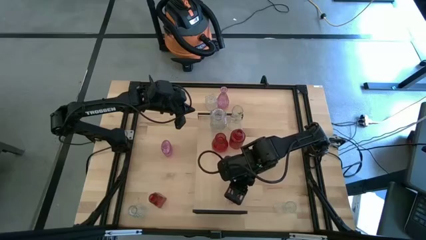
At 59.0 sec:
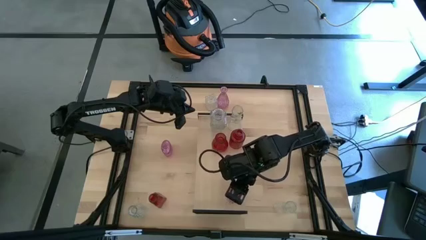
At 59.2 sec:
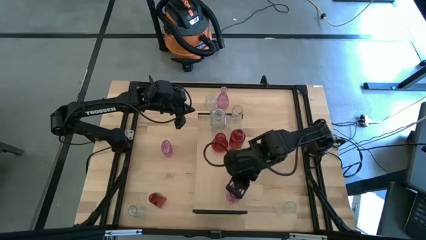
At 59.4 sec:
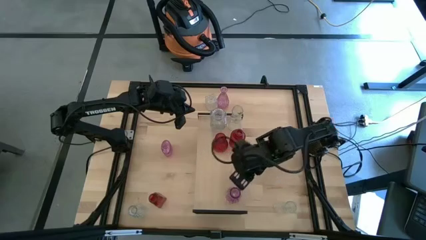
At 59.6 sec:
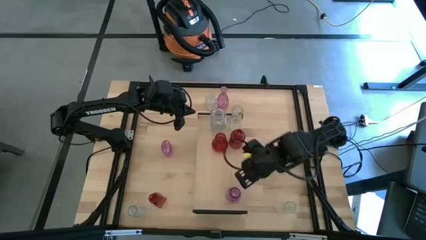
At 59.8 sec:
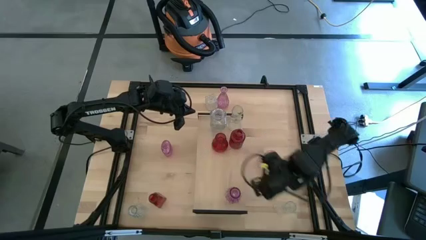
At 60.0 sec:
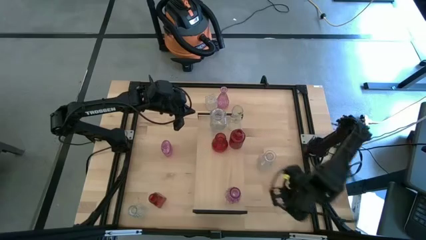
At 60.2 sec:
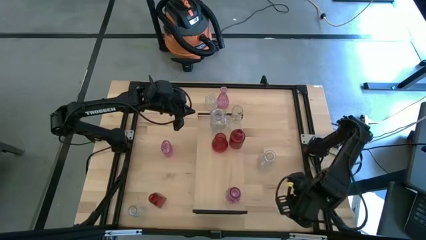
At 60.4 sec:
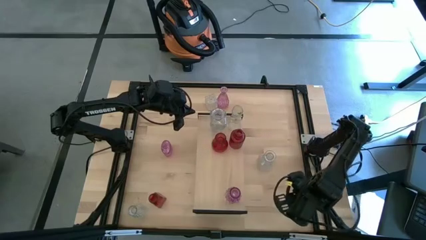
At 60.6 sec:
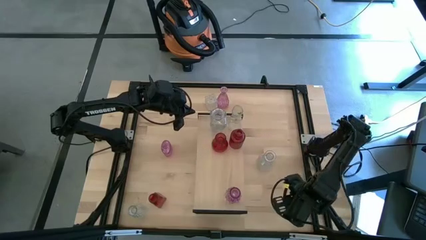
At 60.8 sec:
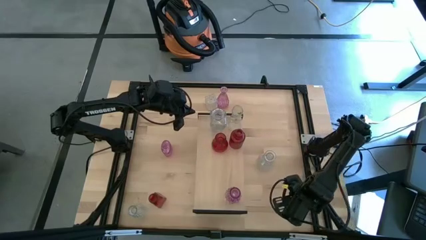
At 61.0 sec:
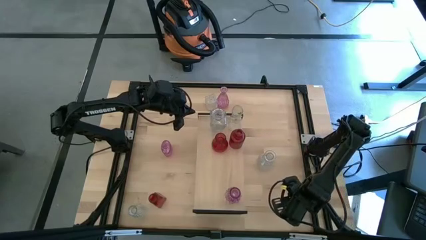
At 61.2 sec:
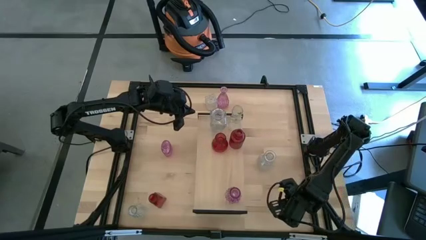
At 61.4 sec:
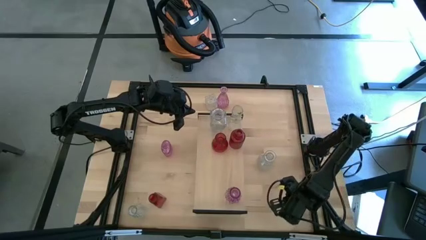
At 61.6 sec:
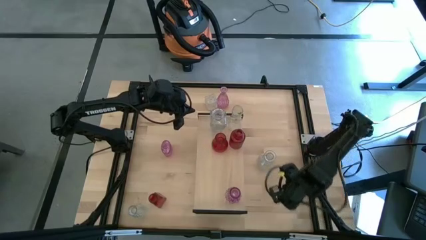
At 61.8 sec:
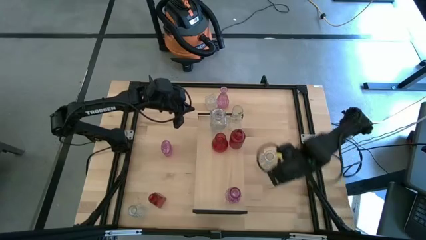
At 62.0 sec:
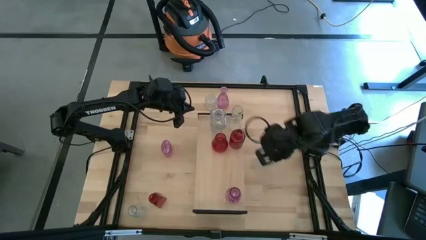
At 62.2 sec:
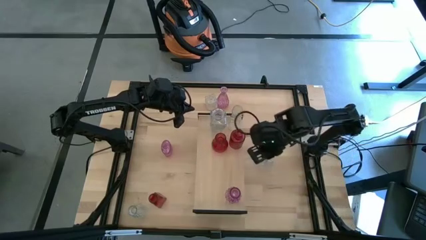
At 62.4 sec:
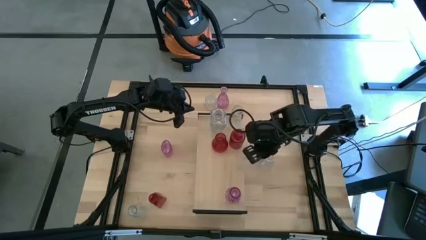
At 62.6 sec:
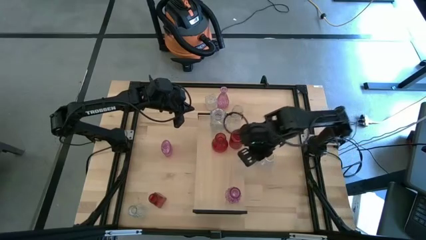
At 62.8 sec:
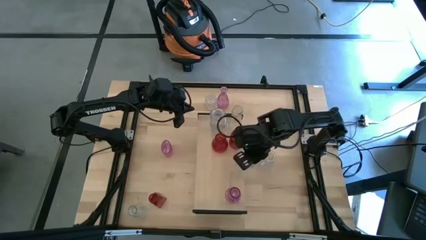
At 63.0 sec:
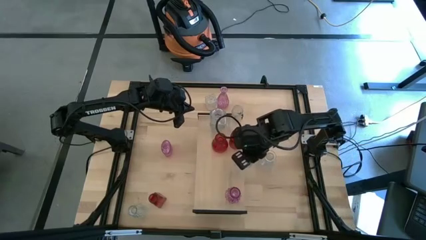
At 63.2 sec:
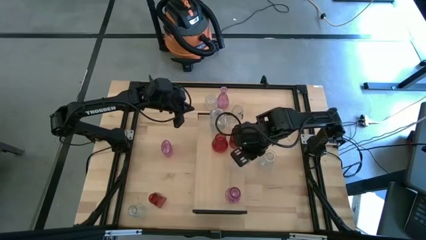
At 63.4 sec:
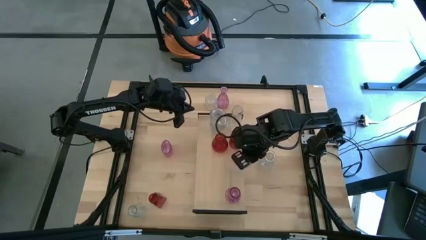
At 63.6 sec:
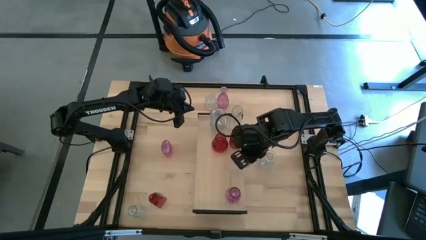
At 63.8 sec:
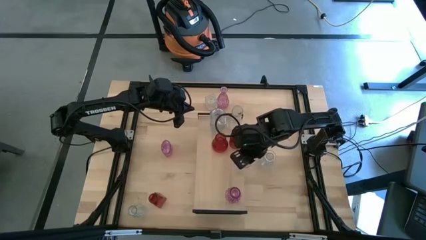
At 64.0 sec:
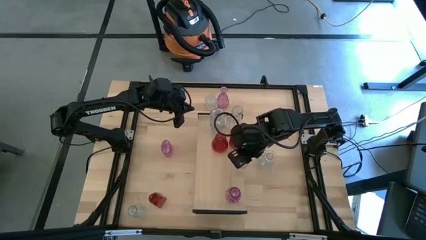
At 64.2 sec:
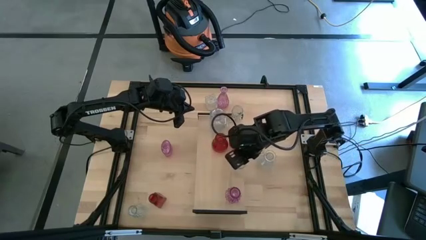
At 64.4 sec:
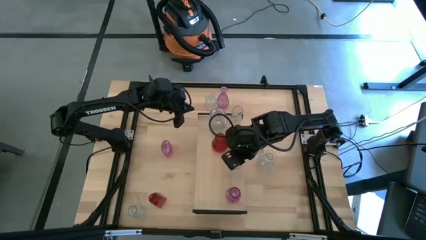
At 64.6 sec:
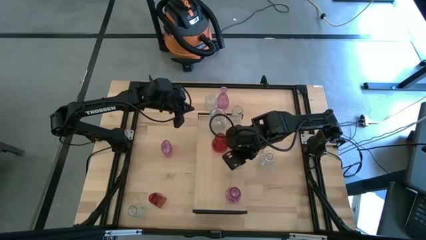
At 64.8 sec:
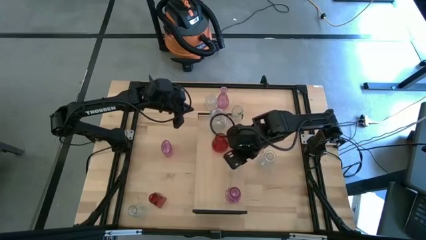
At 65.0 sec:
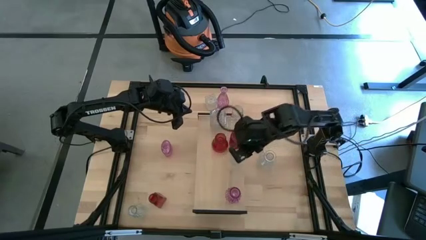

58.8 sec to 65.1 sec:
Task: sort vases onto shelf
Put the transparent vase on the shelf

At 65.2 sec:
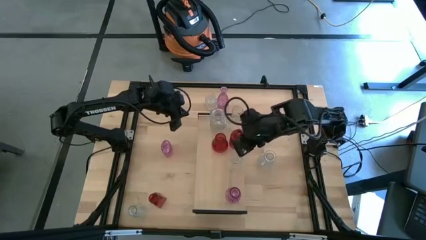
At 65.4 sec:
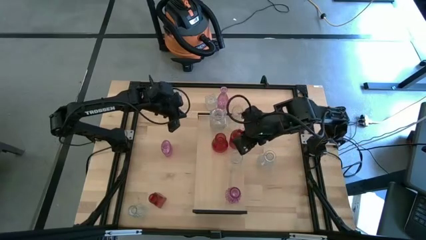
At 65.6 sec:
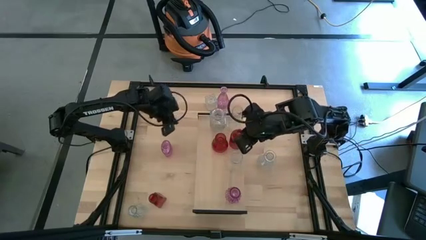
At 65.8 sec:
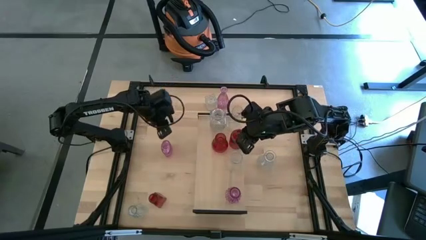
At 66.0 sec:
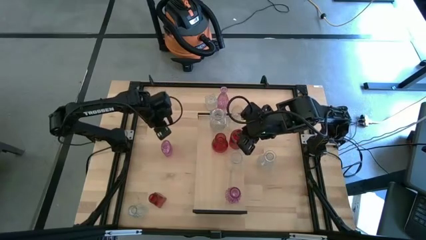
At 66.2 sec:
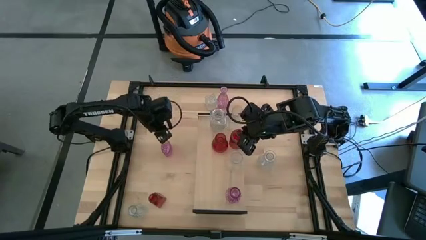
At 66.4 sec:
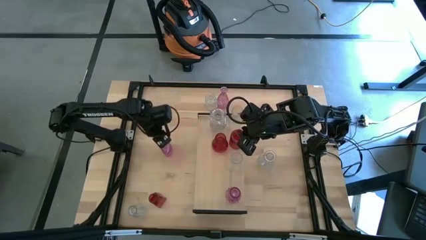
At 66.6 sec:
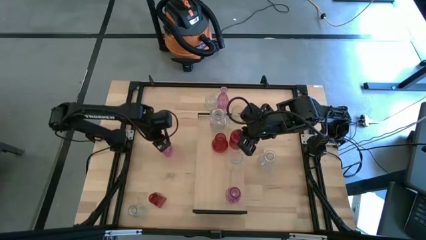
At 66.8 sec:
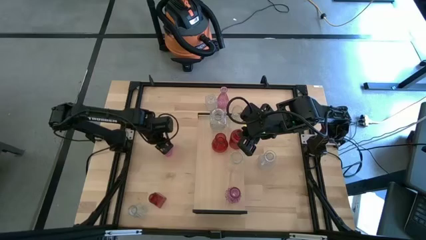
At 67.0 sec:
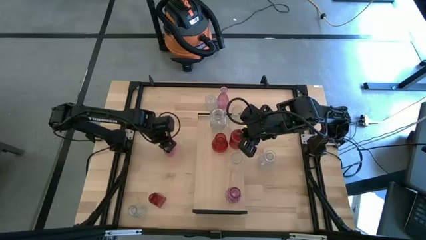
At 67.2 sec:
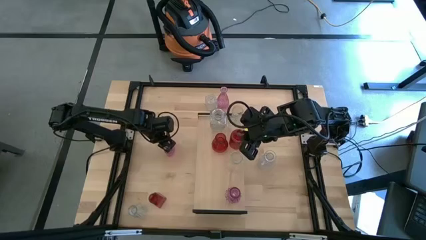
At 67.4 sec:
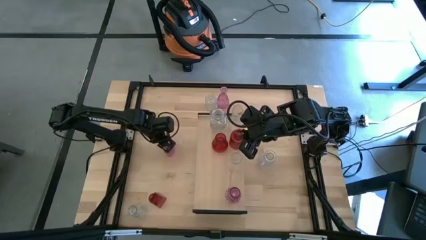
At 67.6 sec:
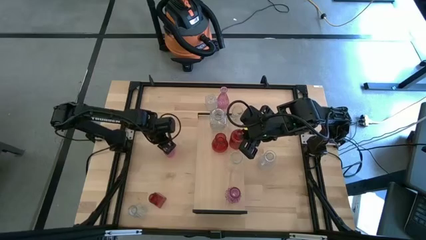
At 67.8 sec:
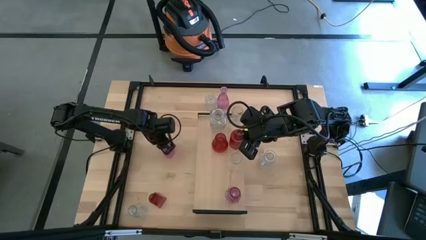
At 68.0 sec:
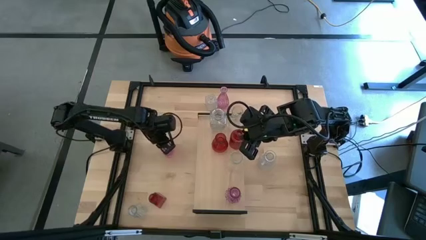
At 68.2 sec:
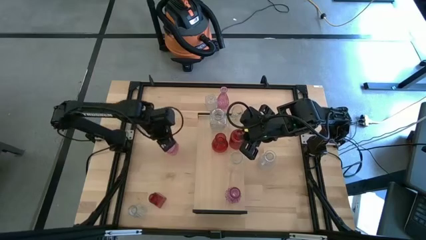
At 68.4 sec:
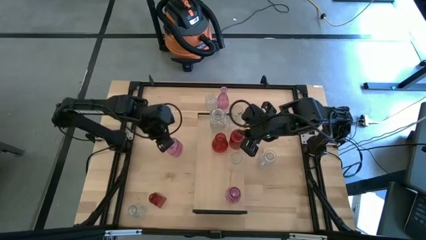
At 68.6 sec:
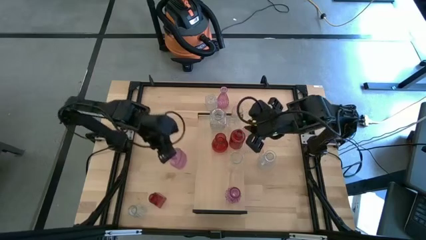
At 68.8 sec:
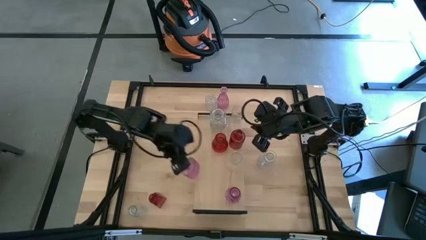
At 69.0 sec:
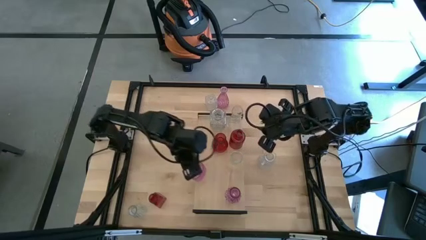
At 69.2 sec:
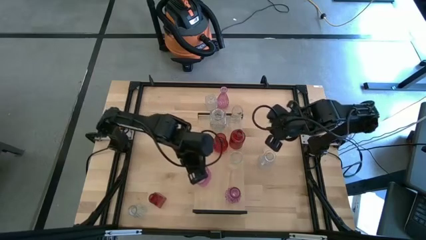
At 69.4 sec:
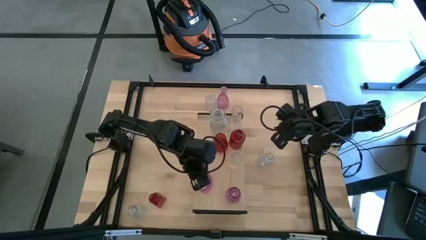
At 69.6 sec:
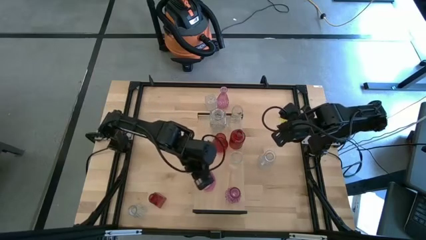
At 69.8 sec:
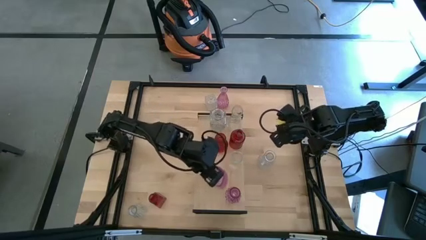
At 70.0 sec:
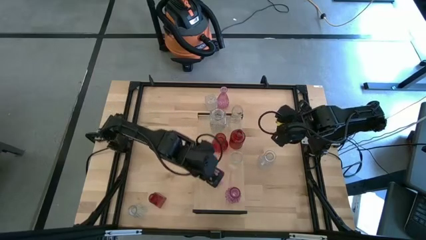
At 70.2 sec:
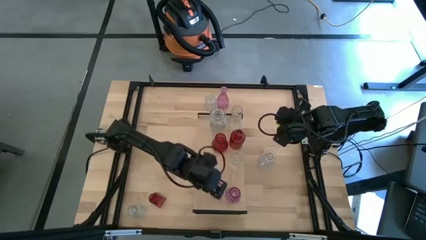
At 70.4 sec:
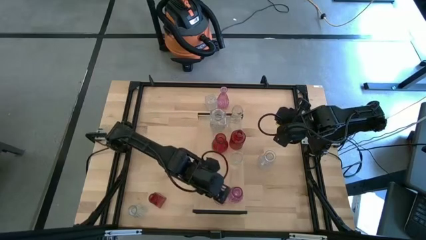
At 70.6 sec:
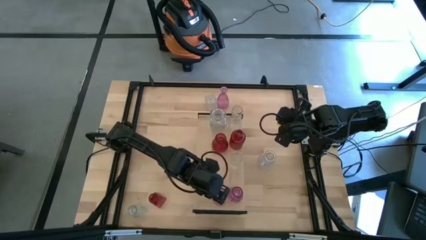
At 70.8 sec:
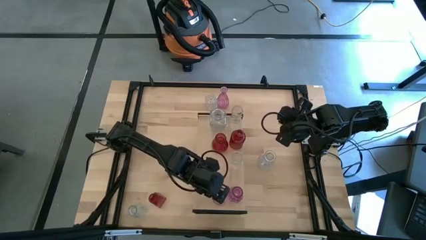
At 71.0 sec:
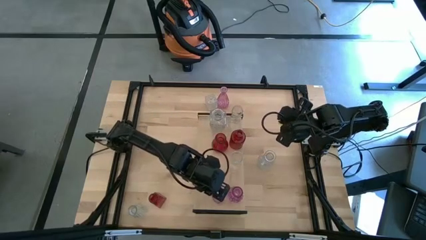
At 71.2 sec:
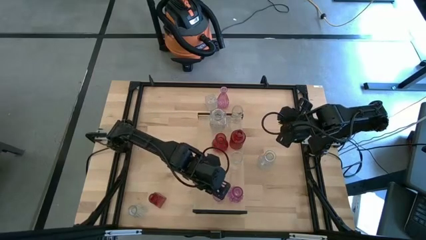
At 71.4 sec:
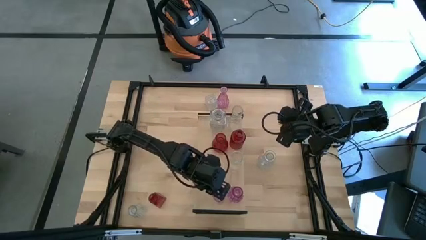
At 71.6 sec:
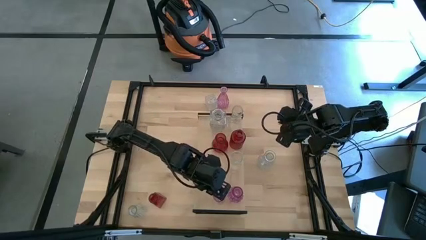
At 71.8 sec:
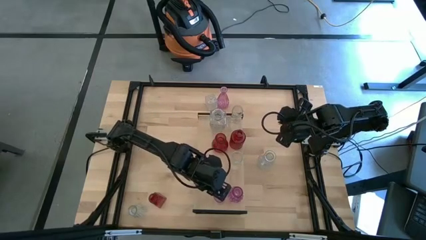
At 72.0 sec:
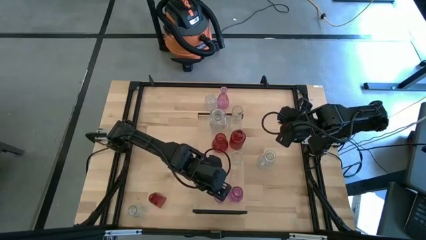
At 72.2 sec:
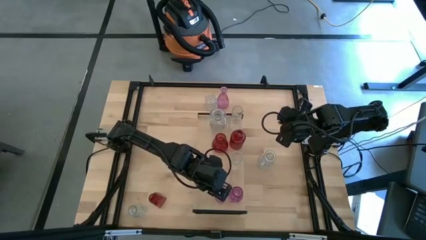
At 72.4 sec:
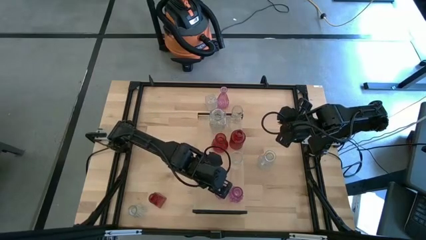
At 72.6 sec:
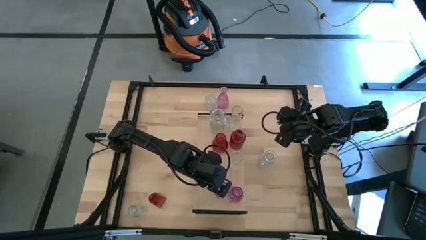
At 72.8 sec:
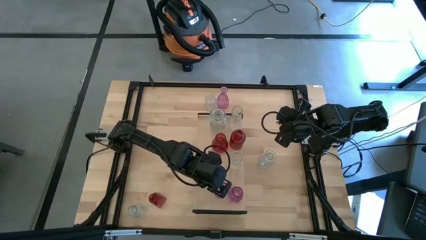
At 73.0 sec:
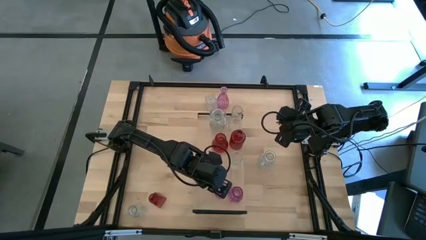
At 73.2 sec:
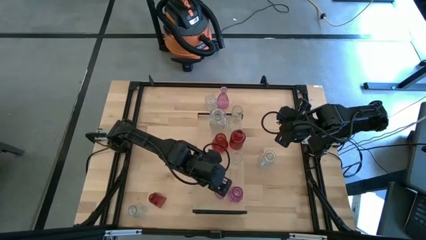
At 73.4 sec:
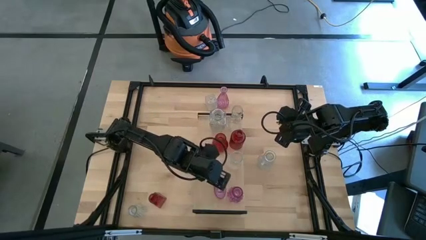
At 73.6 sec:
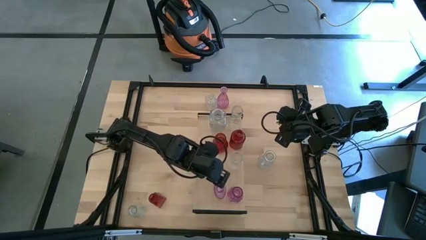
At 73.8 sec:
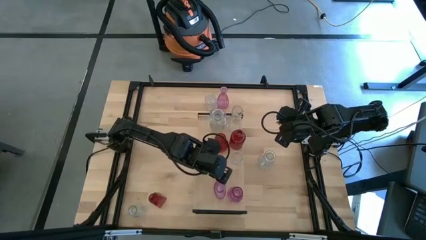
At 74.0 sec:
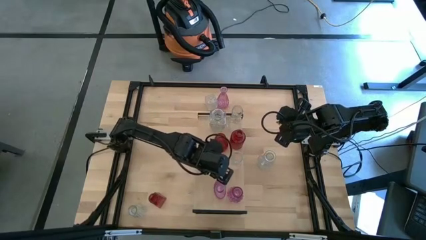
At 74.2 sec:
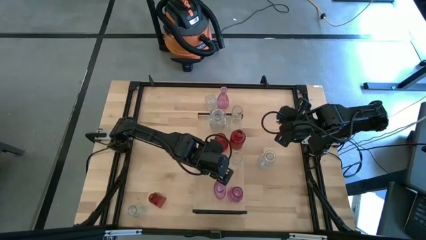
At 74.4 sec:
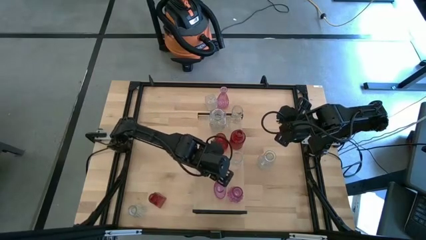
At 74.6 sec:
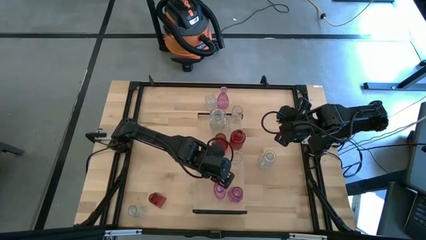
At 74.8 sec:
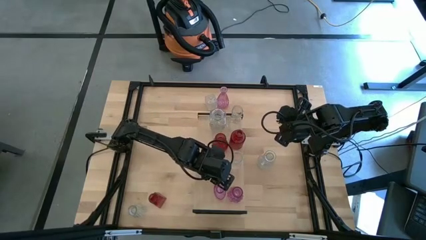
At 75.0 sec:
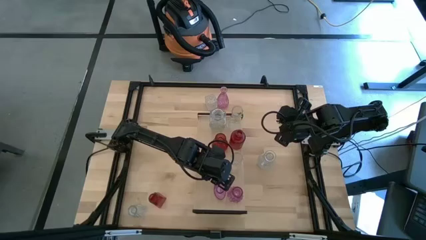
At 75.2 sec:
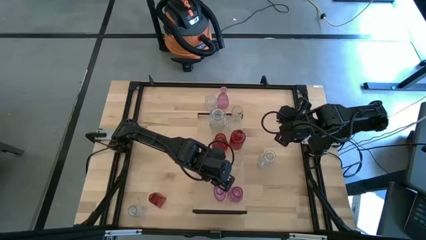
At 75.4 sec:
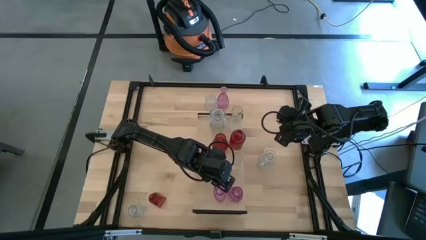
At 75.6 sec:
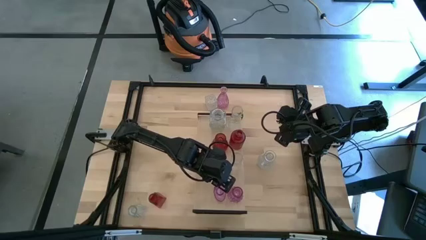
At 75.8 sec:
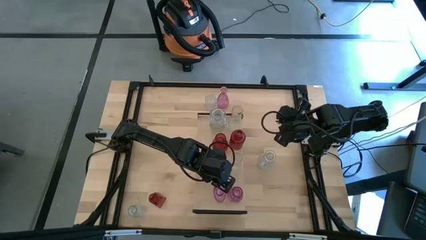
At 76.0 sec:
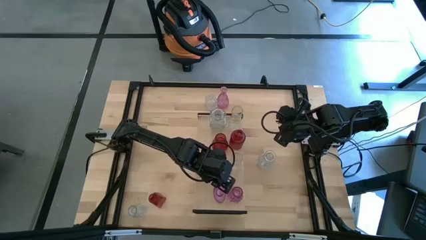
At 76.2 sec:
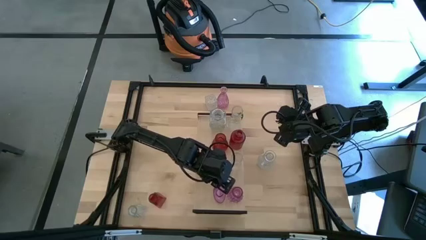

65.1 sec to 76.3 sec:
Put the violet vase on the shelf aligned with the violet vase
